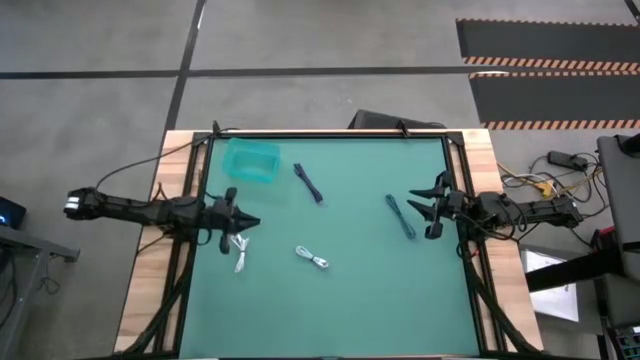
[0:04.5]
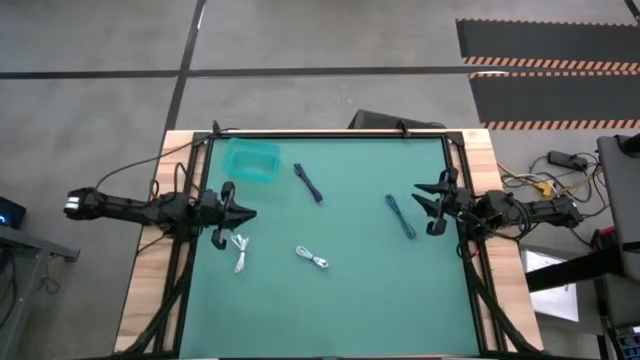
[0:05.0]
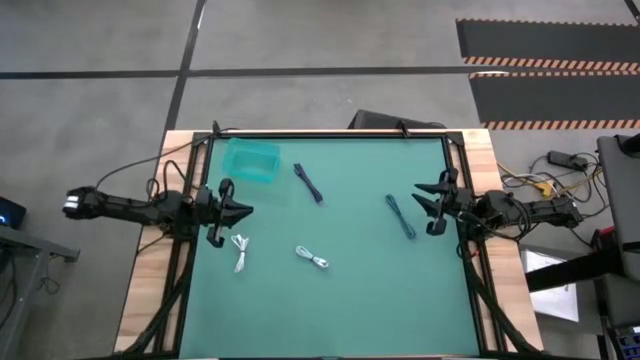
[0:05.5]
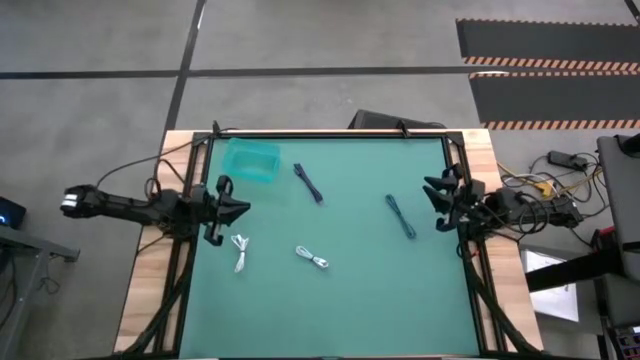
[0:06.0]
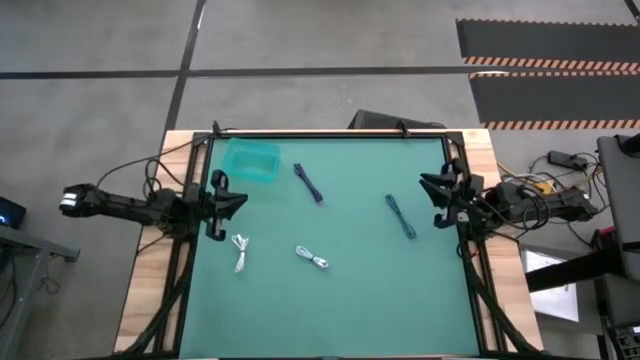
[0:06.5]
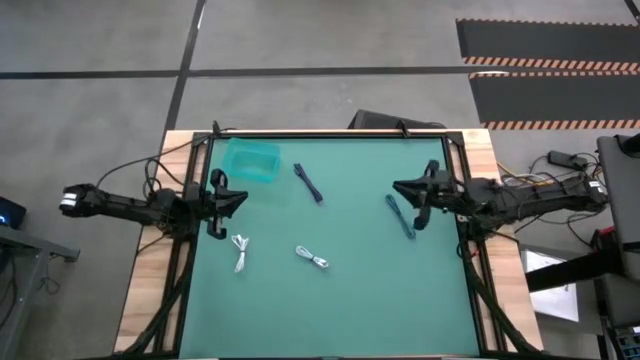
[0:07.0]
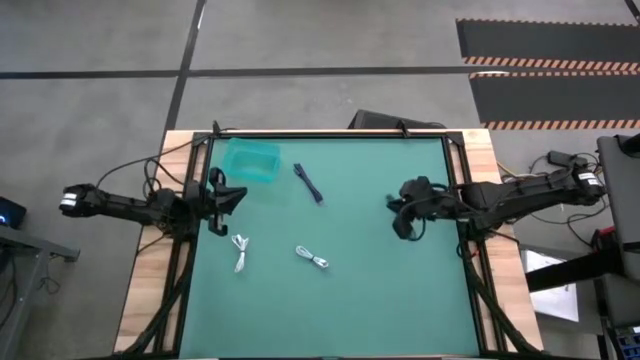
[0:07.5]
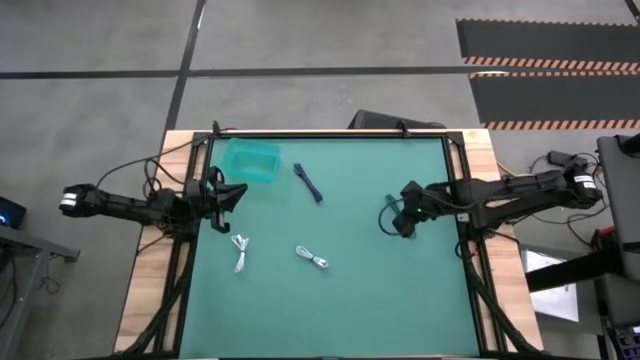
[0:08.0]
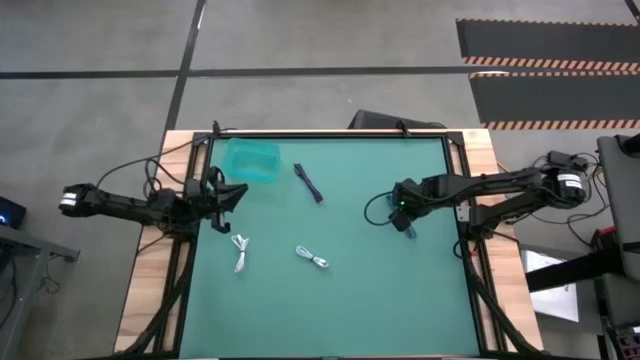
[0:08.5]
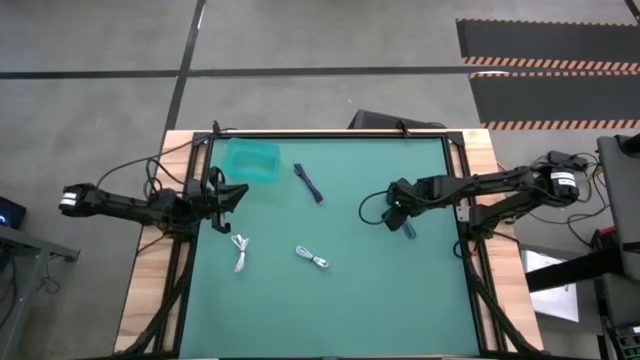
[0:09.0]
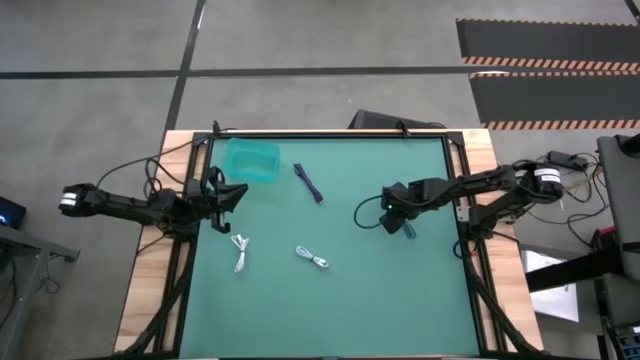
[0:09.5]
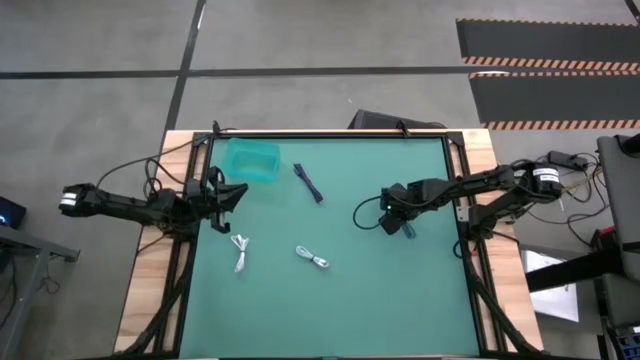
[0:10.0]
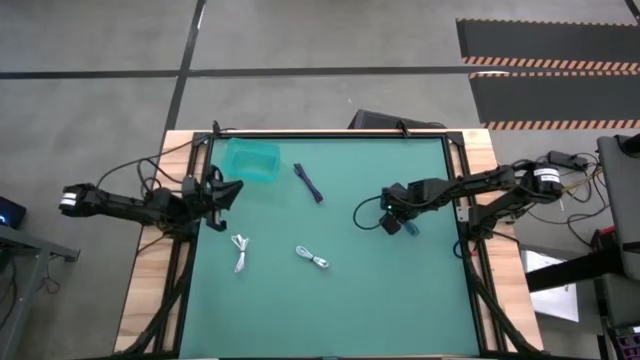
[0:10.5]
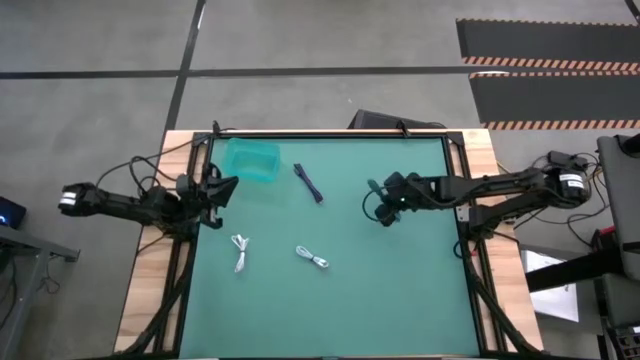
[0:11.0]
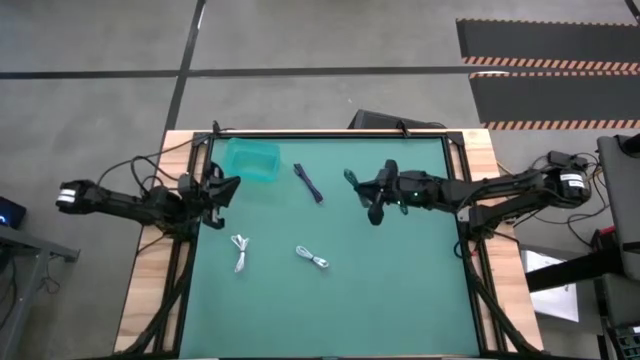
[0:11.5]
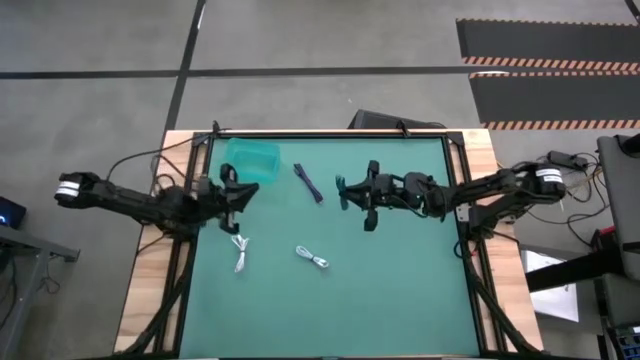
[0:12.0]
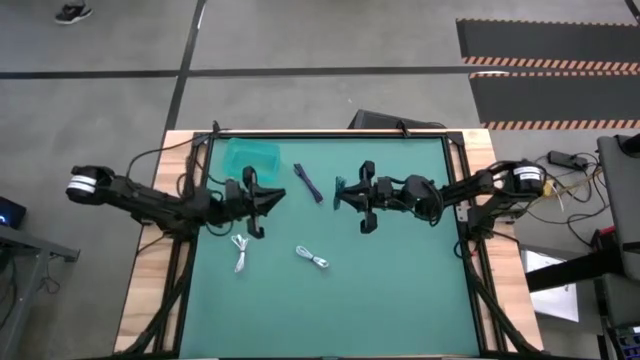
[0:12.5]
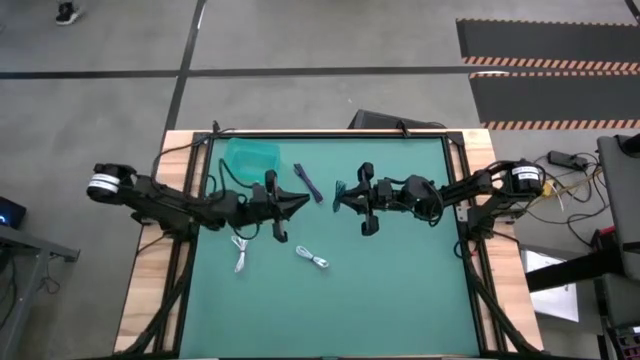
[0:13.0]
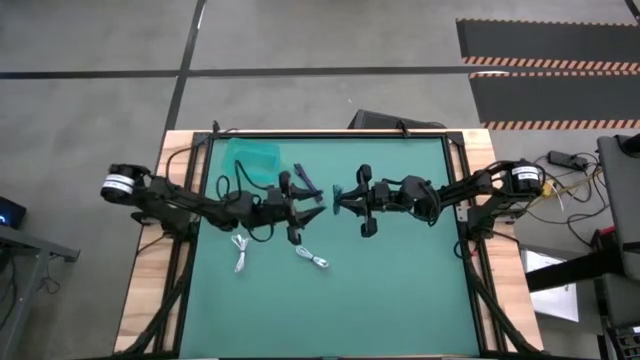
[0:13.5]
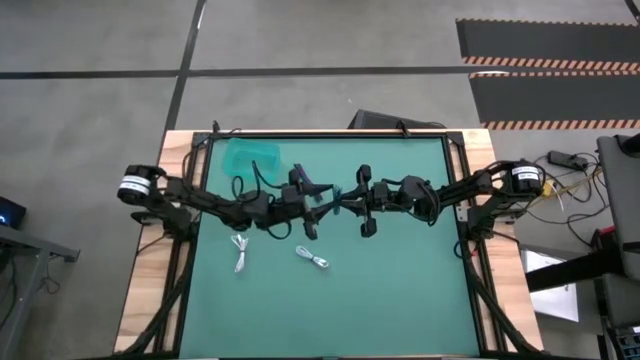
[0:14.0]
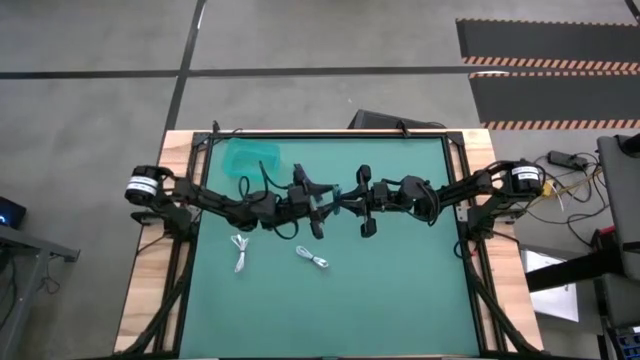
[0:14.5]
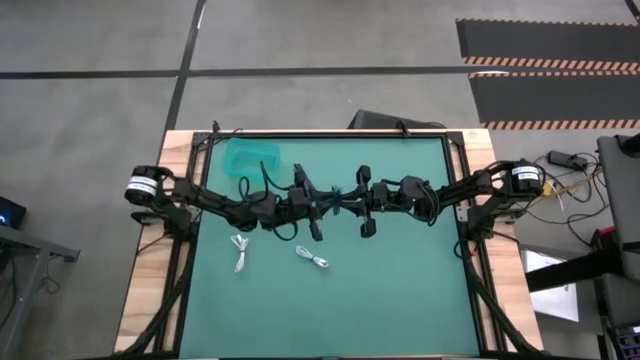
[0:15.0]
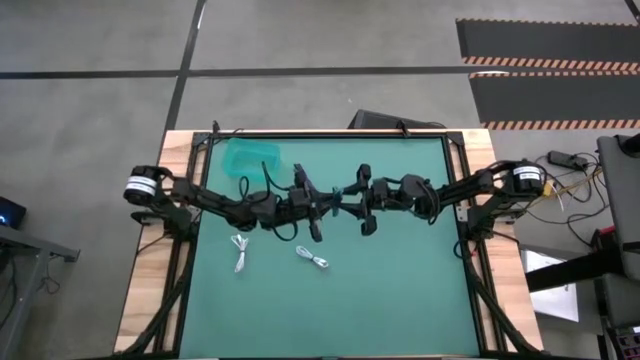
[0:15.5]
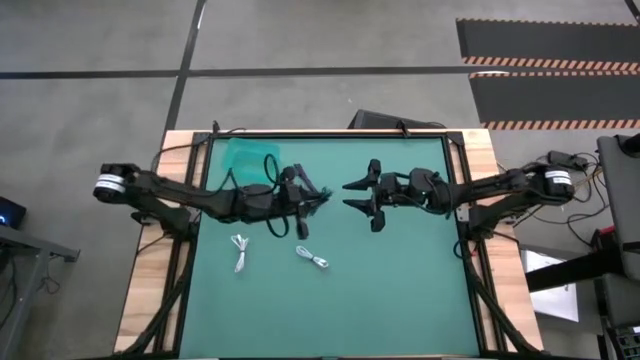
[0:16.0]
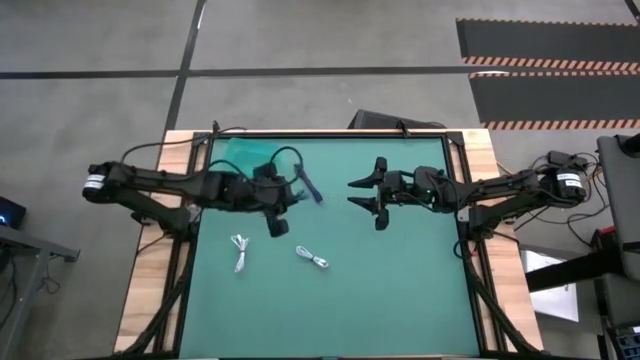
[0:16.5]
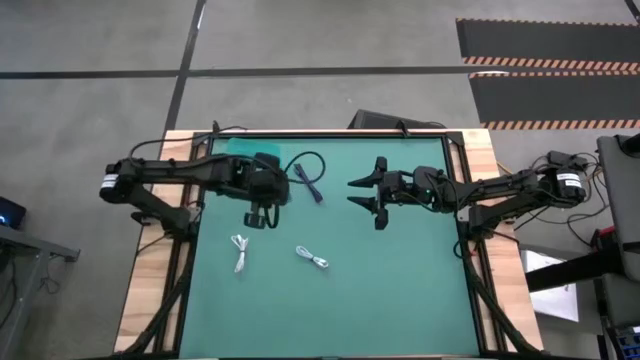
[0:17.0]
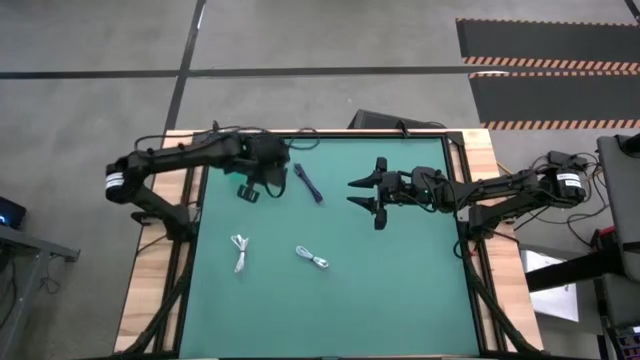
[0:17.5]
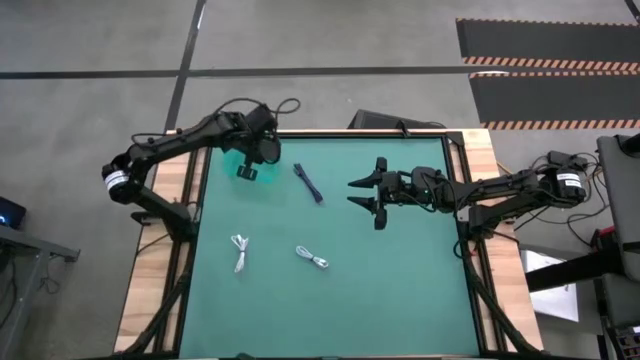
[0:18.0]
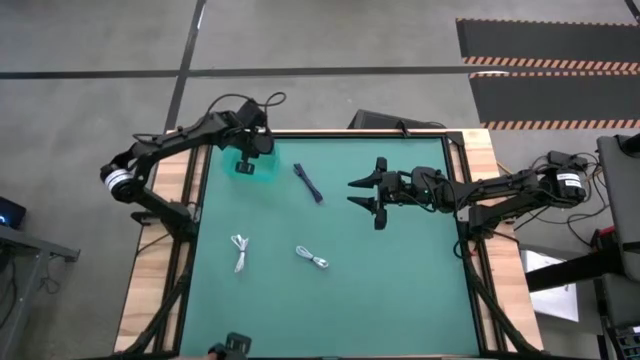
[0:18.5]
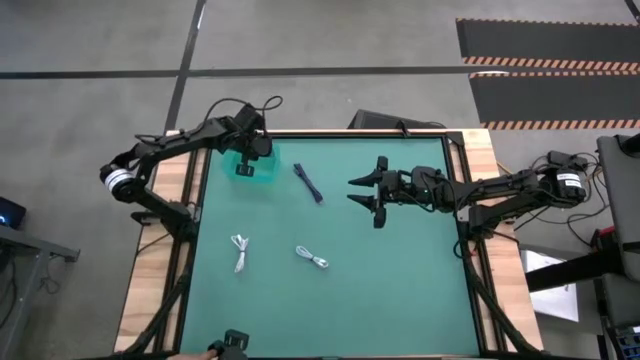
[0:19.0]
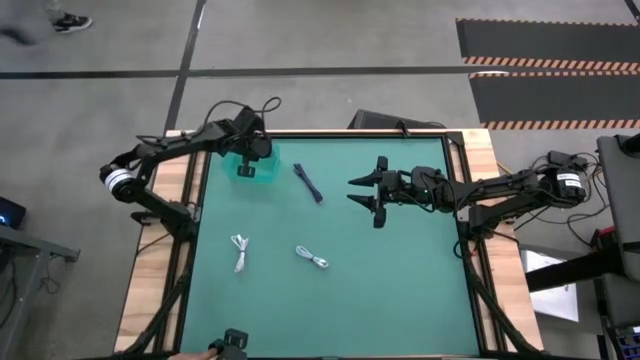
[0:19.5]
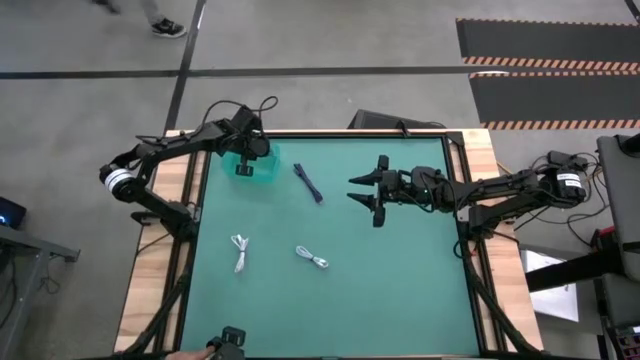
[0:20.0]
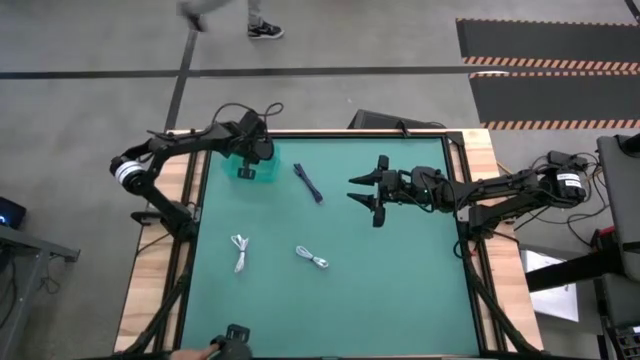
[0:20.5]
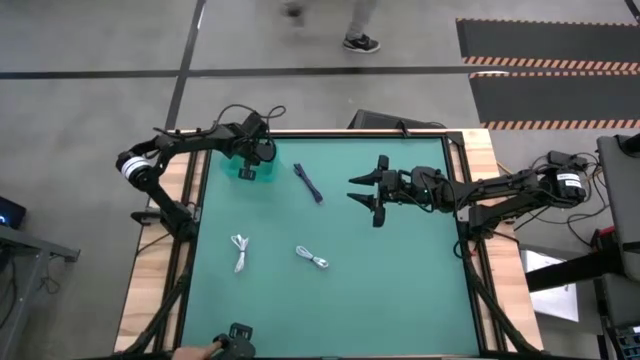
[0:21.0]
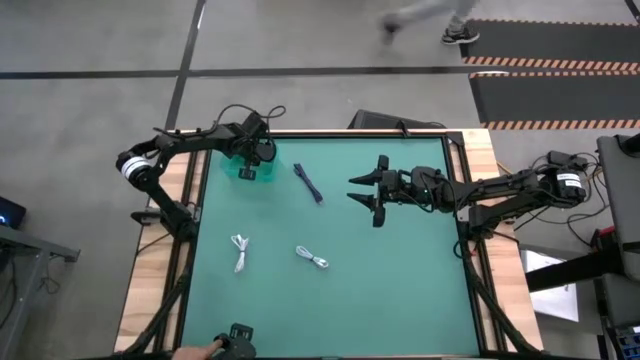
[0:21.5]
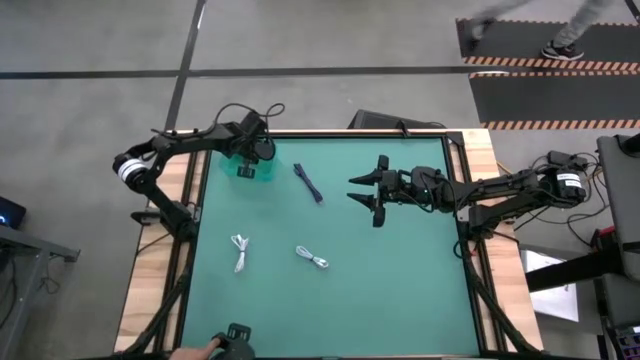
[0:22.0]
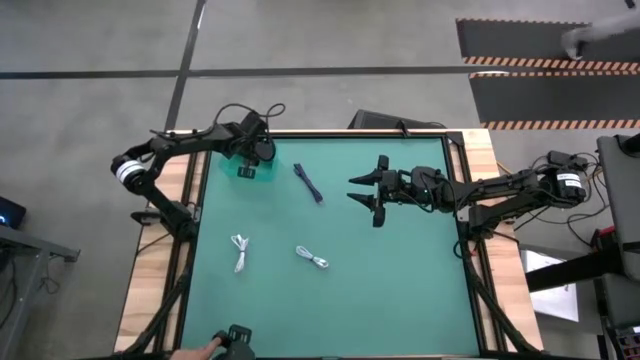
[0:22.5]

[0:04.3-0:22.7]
Task: Pick and place USB-C Cables
Put the blue charger cable into the blue bin

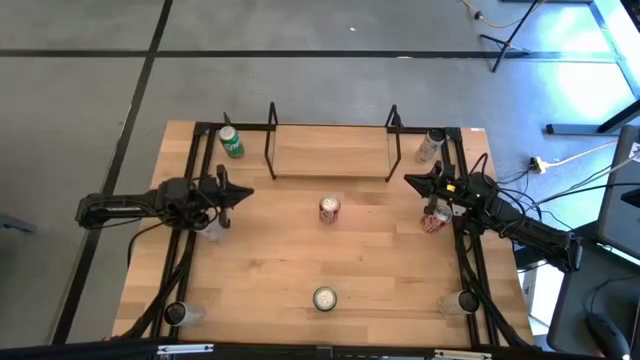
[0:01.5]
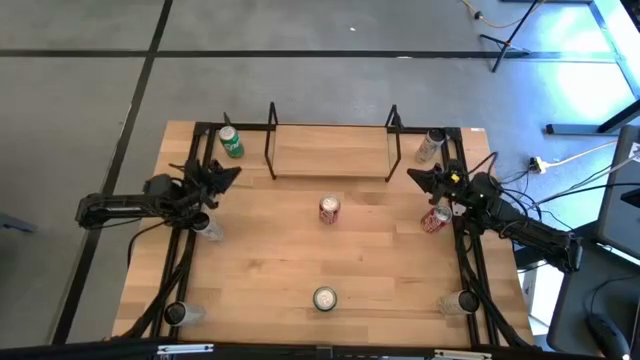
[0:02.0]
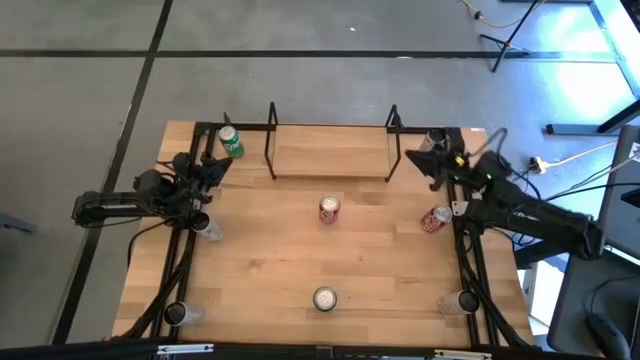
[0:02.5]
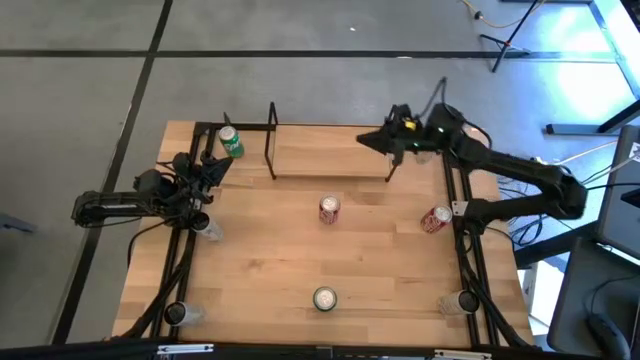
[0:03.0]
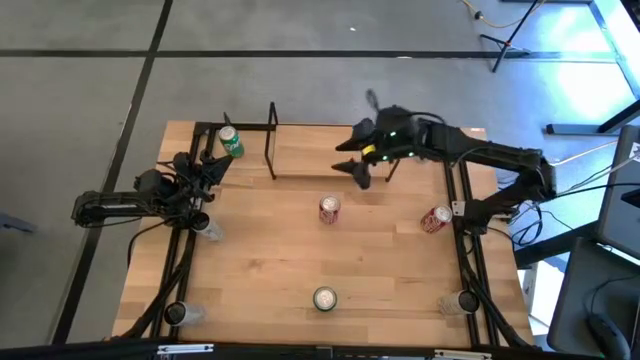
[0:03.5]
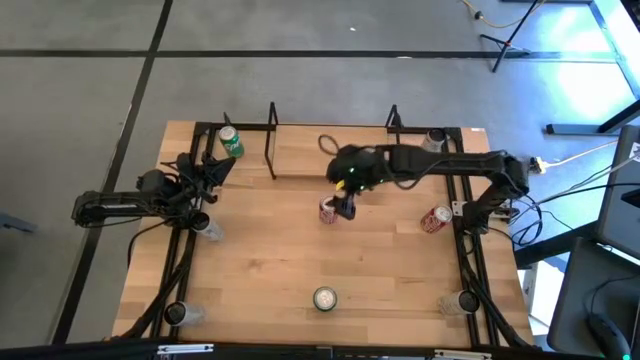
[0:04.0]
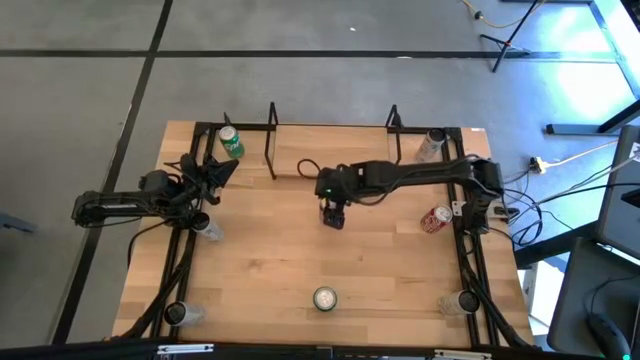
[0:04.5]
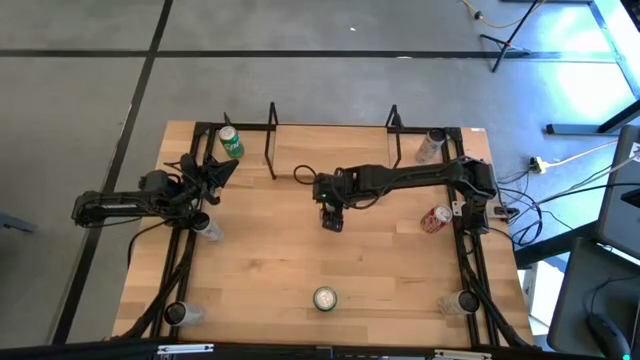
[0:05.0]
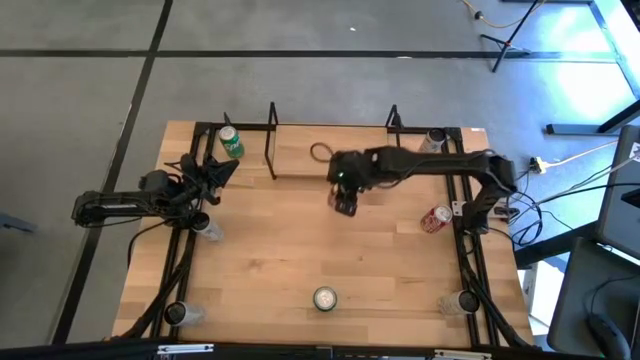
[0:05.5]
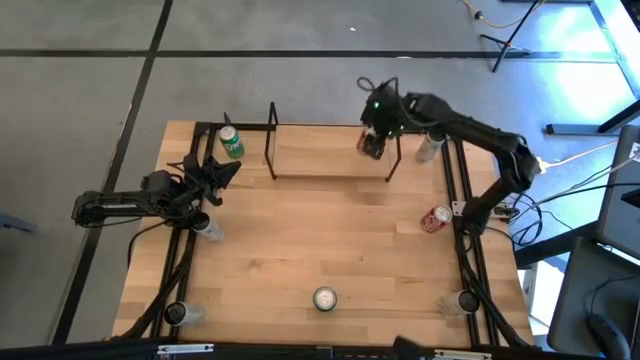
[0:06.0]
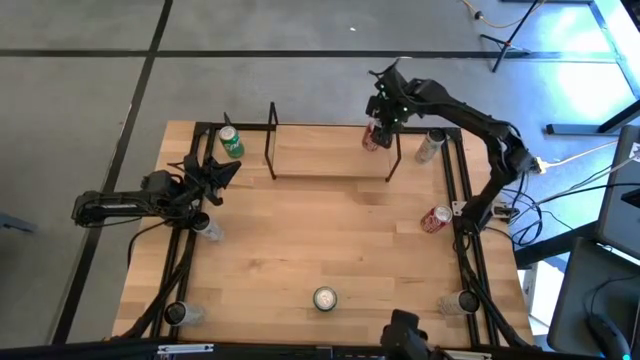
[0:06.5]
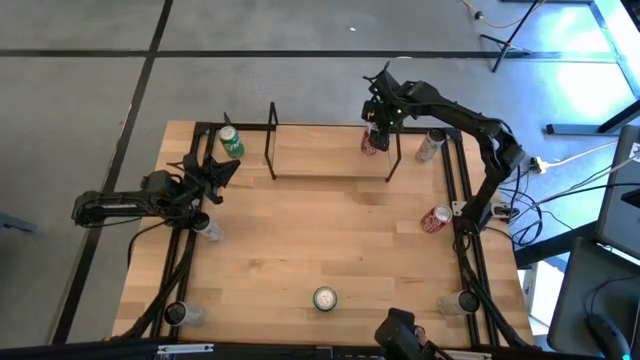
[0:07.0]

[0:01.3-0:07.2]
Task: Place canned beverage on shelf
Put the left red soda can on the shelf
